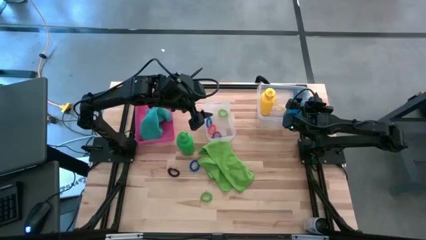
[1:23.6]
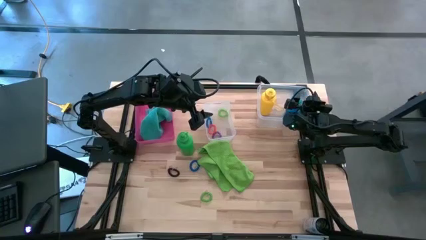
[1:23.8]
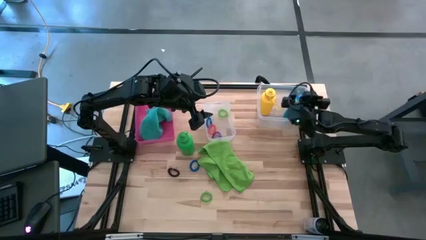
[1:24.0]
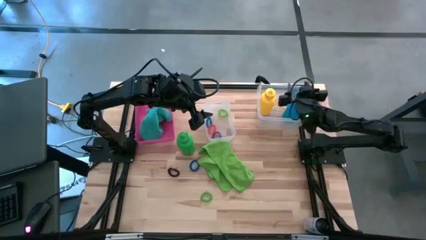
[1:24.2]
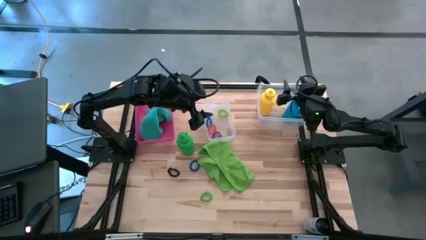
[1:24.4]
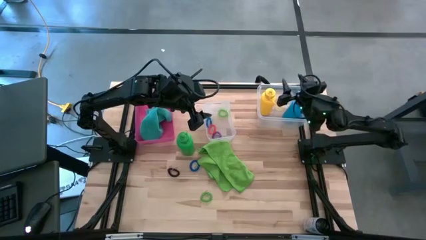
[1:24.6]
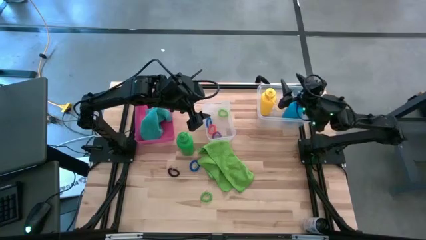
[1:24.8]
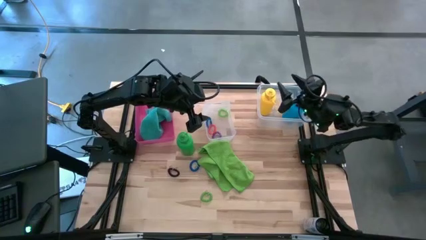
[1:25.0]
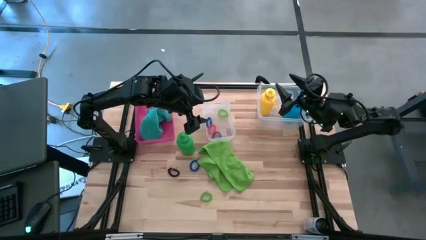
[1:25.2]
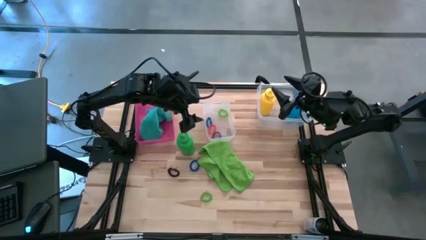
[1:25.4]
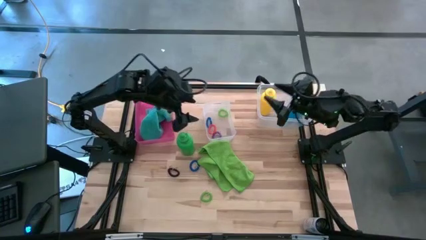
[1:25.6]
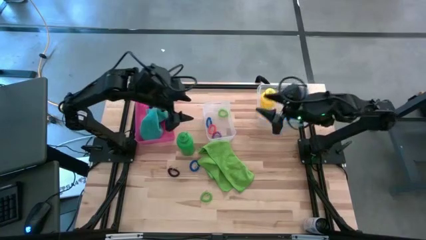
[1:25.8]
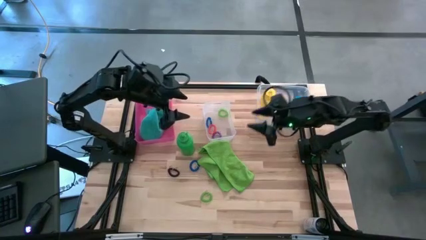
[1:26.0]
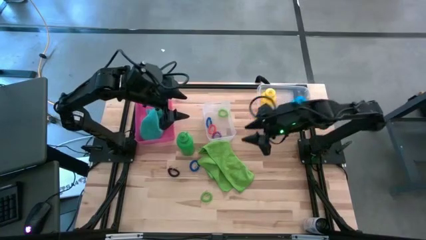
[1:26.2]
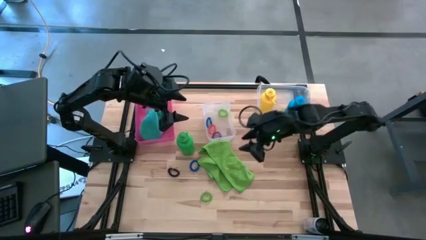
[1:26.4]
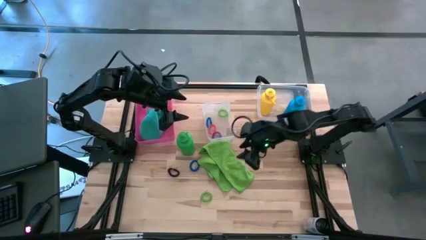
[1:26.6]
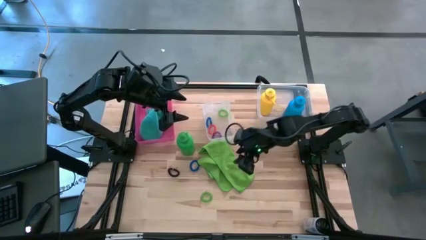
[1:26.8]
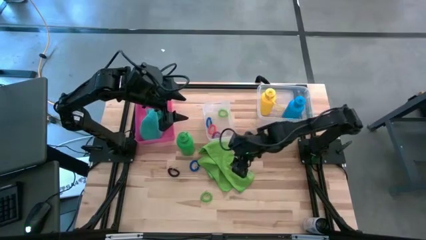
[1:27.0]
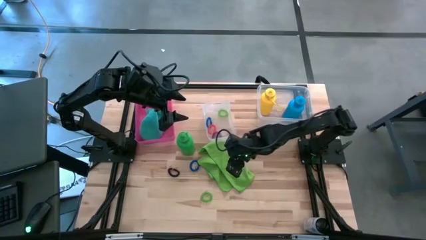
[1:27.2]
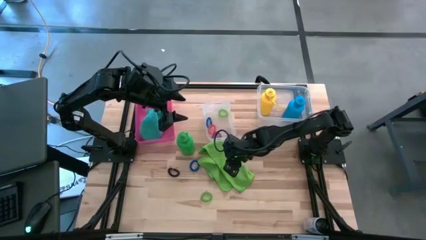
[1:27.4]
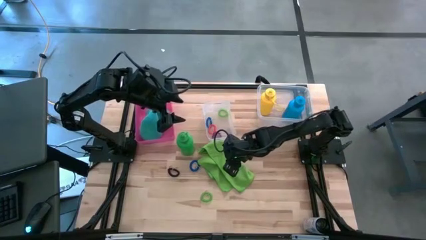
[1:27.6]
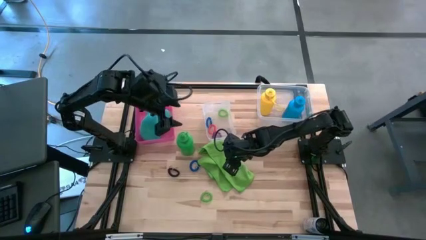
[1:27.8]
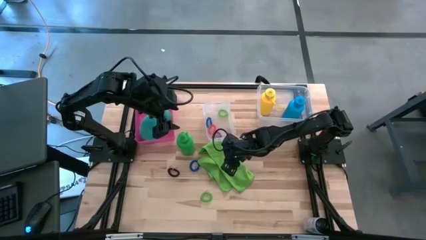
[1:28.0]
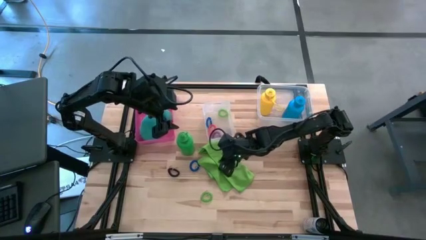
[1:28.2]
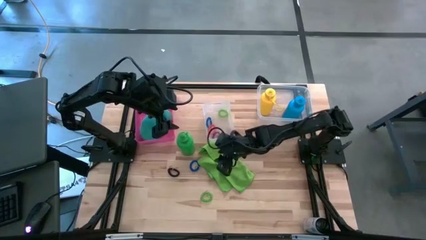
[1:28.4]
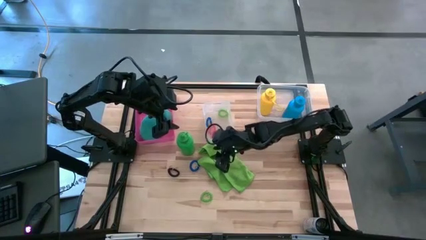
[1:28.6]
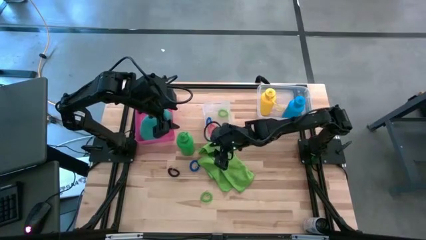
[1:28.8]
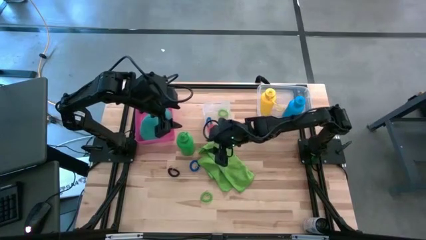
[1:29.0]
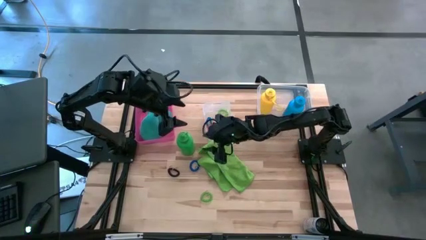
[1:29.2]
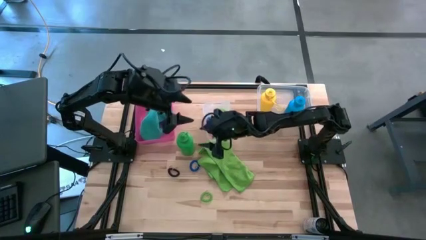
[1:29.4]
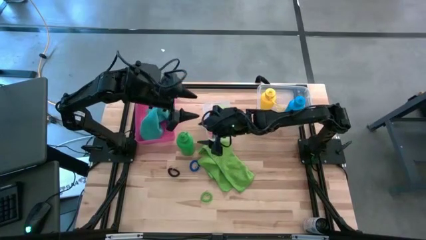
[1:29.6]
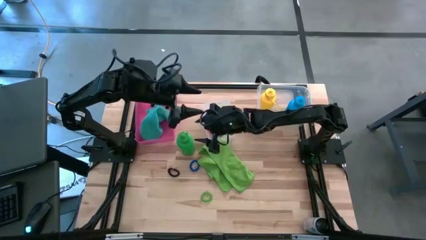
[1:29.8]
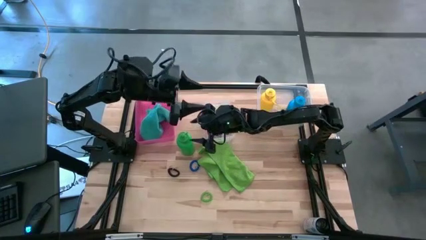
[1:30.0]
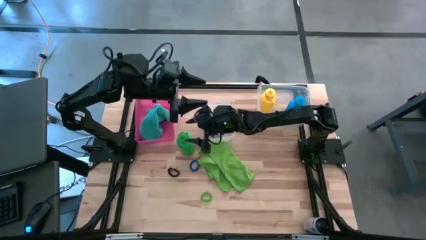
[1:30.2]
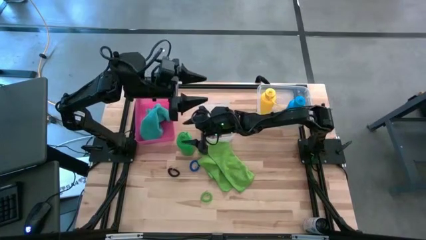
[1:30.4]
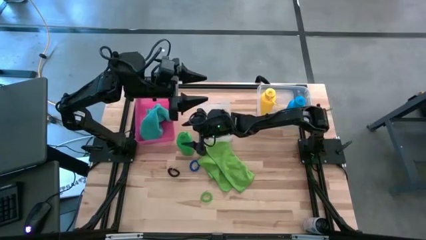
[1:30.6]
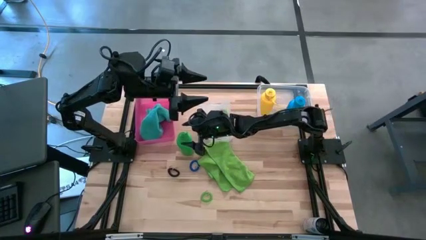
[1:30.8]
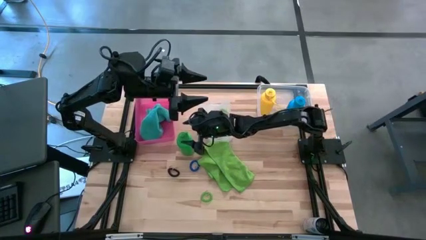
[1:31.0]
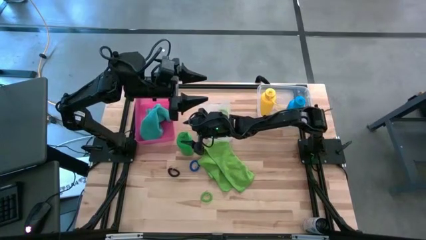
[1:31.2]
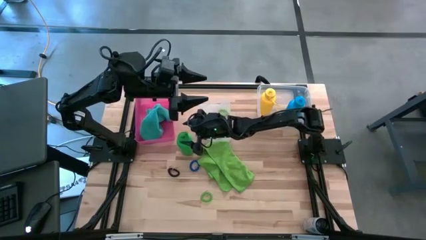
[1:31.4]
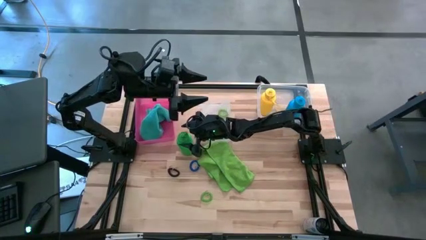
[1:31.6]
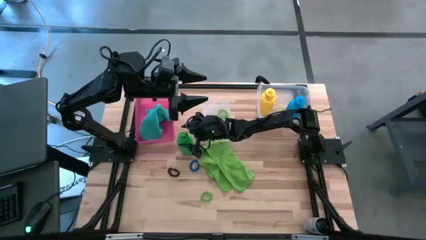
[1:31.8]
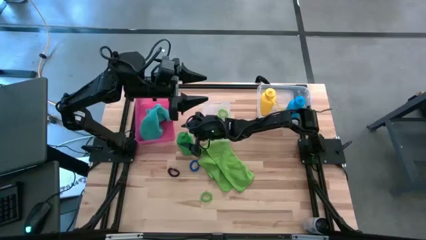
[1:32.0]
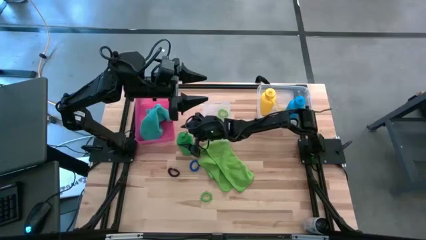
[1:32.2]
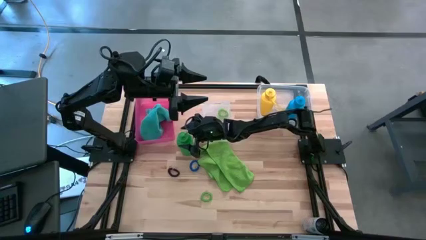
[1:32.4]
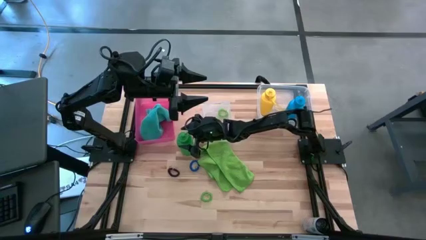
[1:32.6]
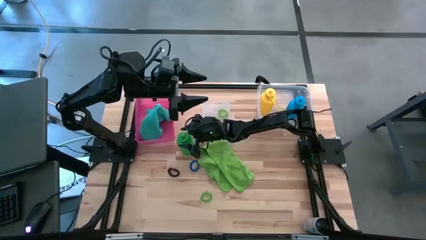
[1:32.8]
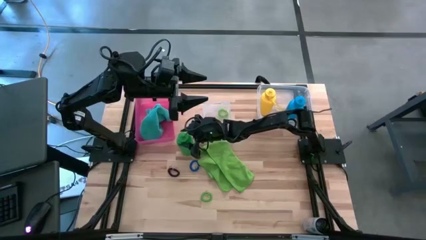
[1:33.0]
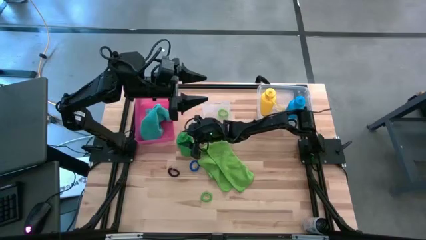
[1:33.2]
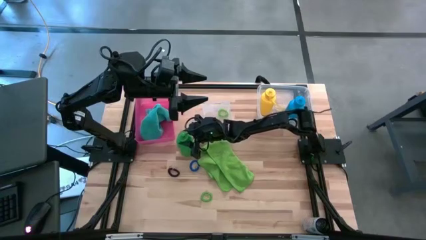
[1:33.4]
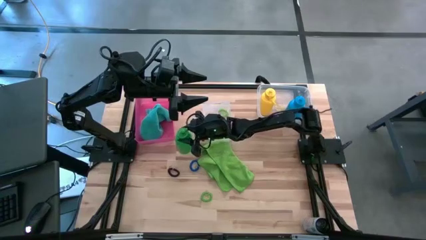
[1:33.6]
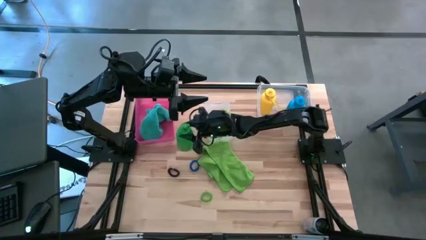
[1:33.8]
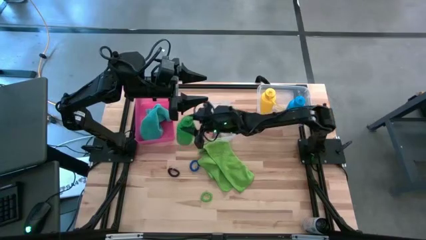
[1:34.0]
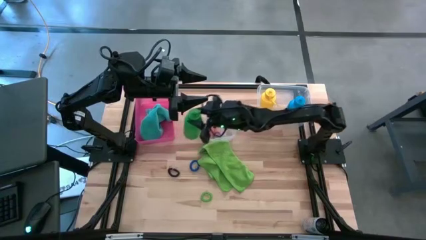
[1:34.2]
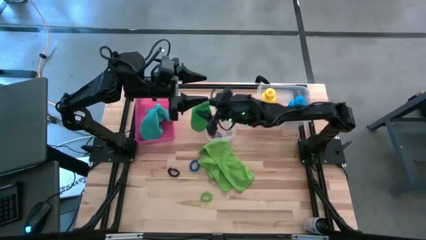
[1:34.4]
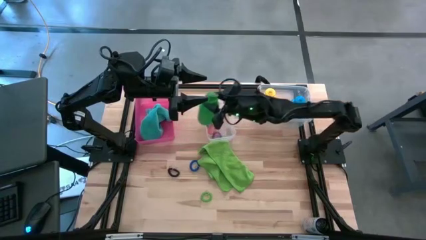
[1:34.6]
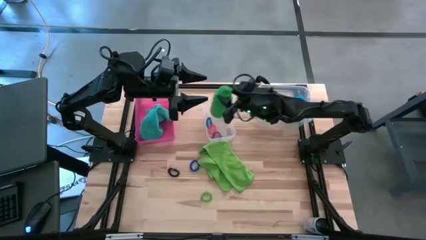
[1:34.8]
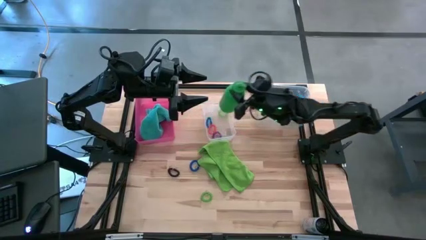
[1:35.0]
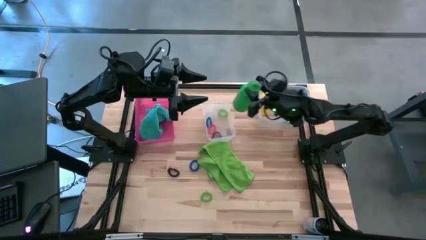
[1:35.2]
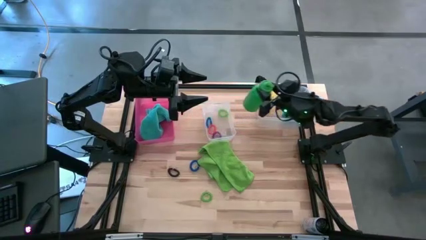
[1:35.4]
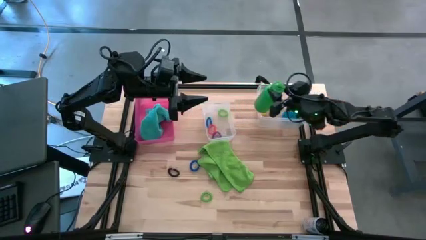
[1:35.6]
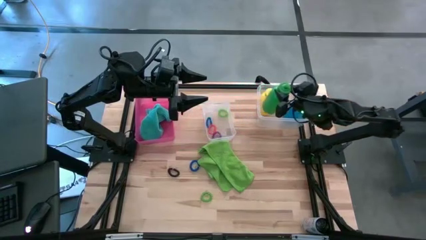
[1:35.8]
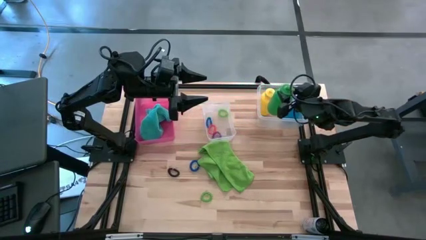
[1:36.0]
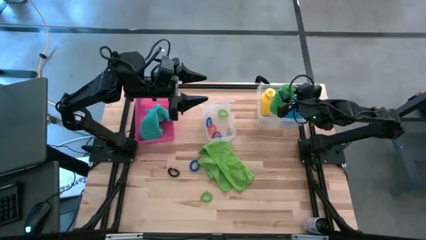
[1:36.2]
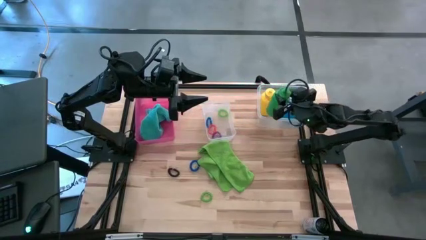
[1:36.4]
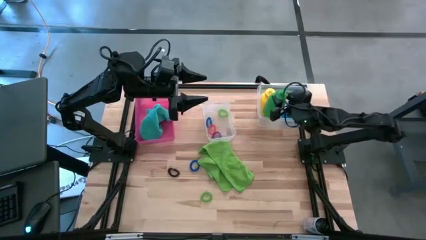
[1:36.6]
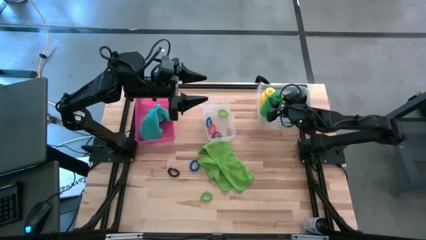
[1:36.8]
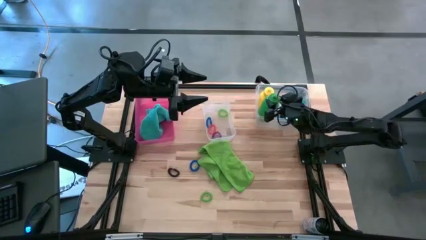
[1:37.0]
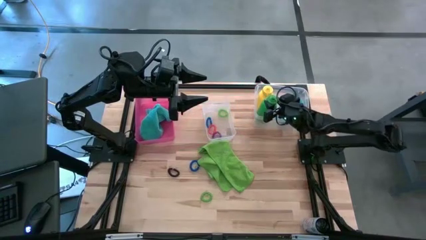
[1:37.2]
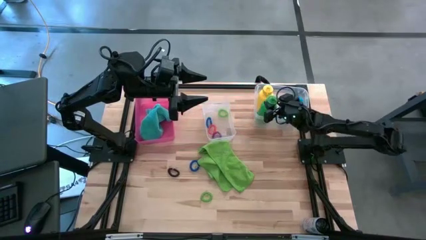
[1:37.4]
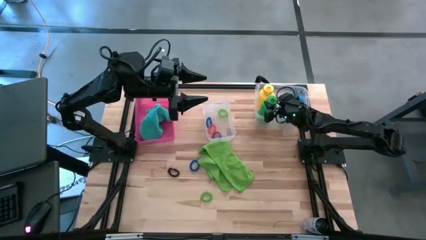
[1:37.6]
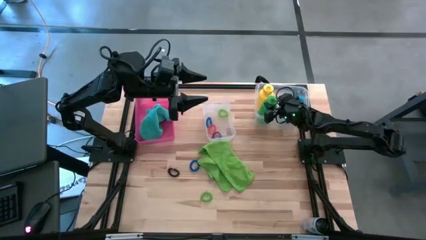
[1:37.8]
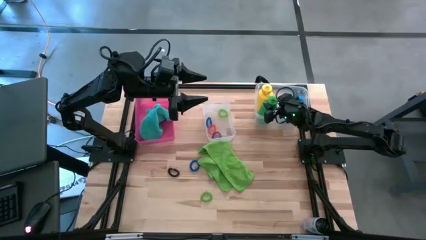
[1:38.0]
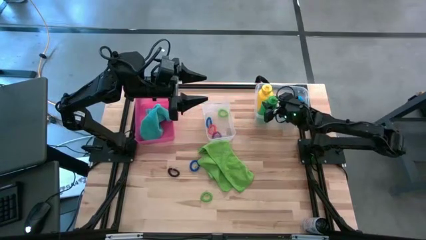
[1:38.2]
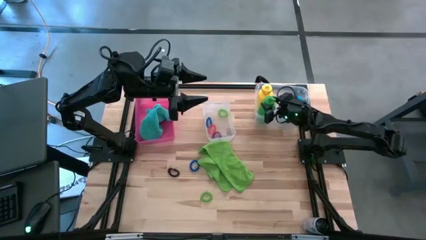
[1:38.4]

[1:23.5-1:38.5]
Task: Pick & Place Sports Items
Put the green water bottle into the right transparent bin

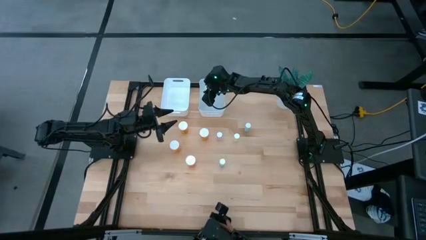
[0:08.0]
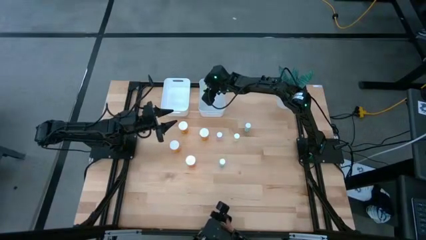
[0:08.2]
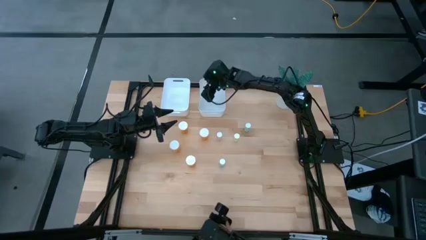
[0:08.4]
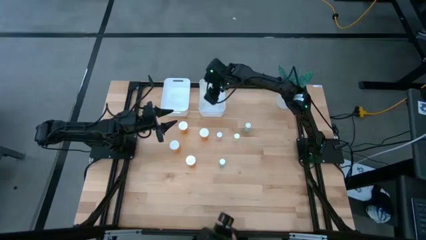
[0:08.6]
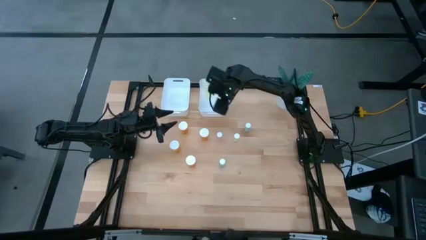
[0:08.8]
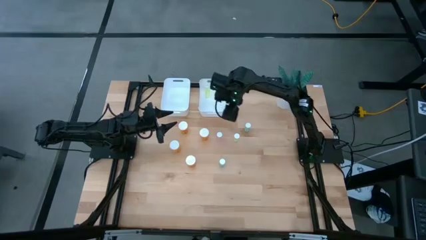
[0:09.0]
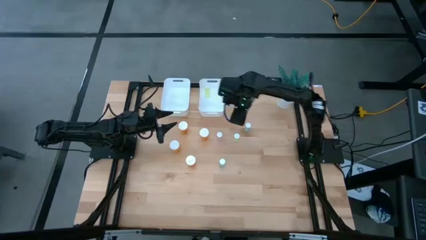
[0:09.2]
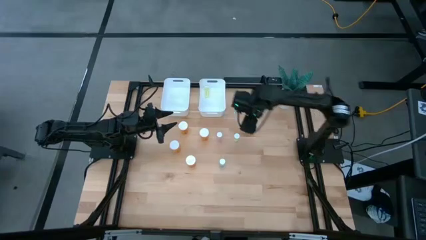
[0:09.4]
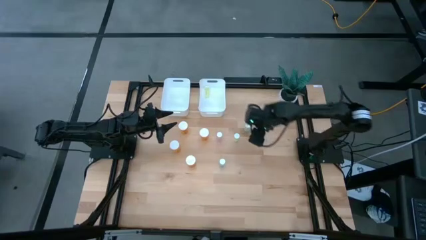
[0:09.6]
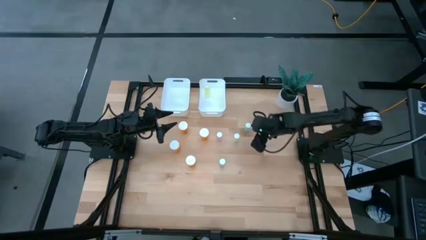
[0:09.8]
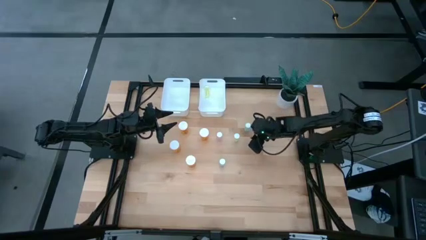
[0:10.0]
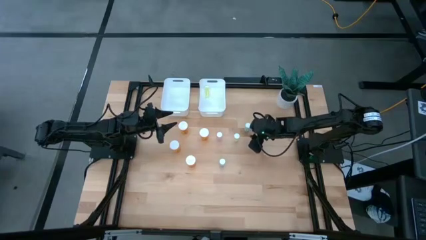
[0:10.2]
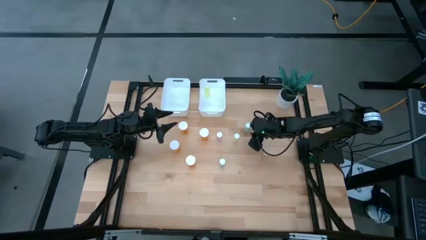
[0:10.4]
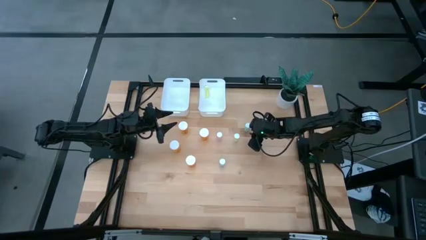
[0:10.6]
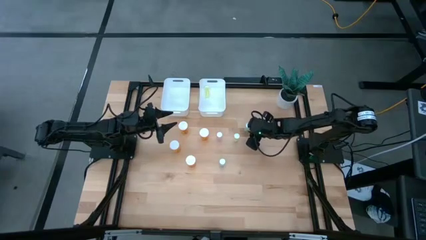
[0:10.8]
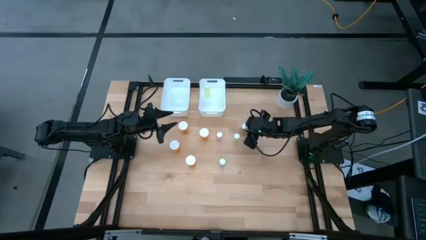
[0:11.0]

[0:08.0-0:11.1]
Task: Pick and place medicine bottles into bin by pill shape (circle, oval)
Put the small blue pill bottle into the right white bin
